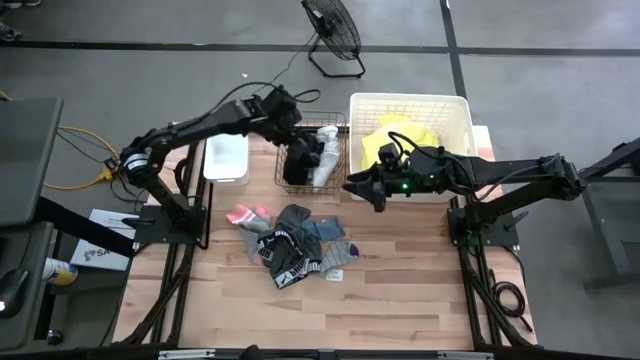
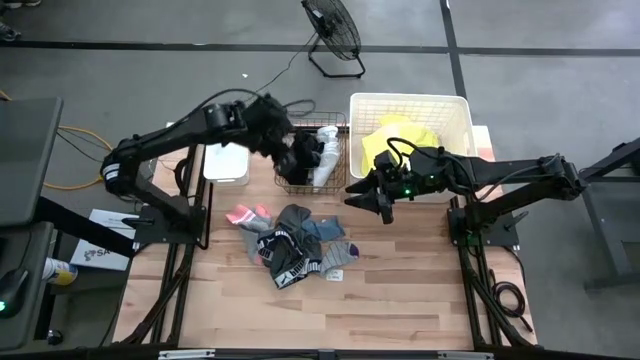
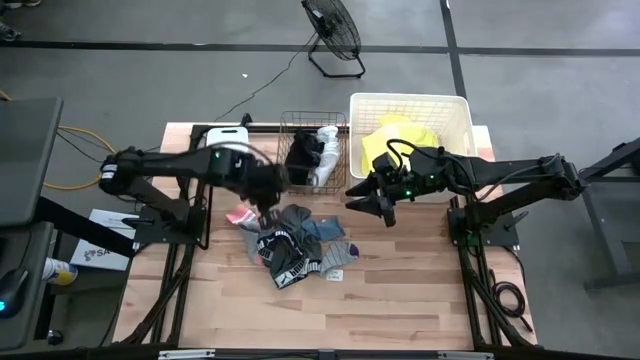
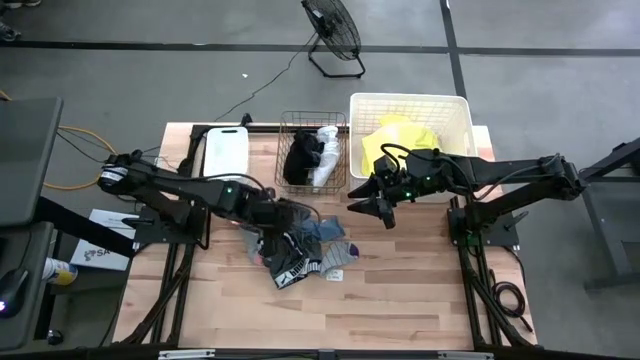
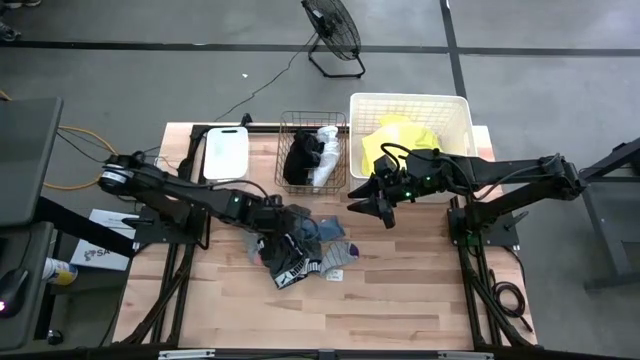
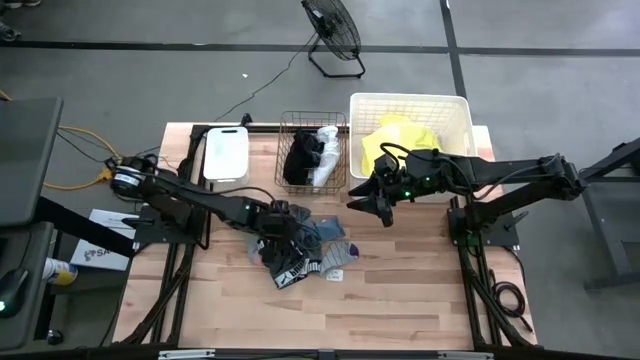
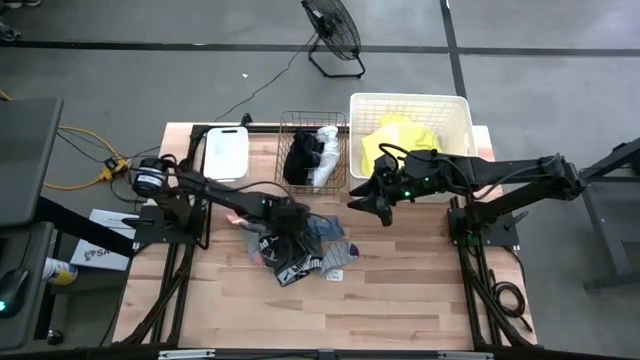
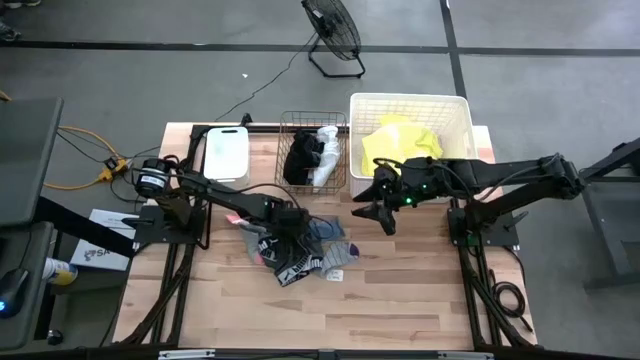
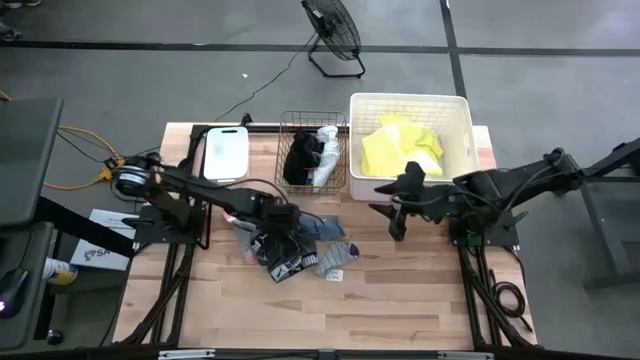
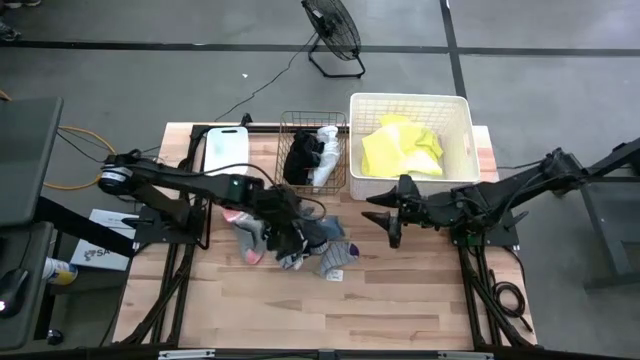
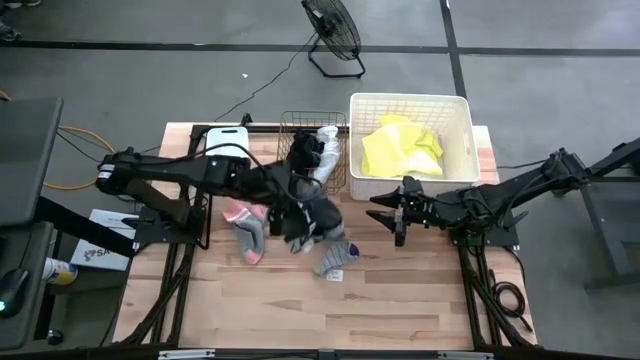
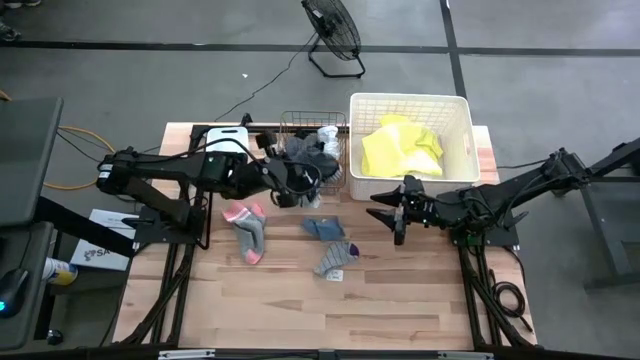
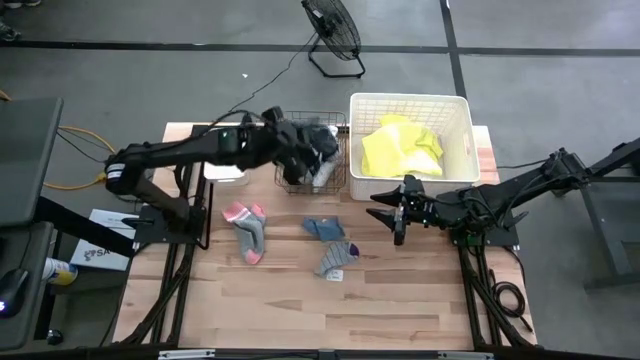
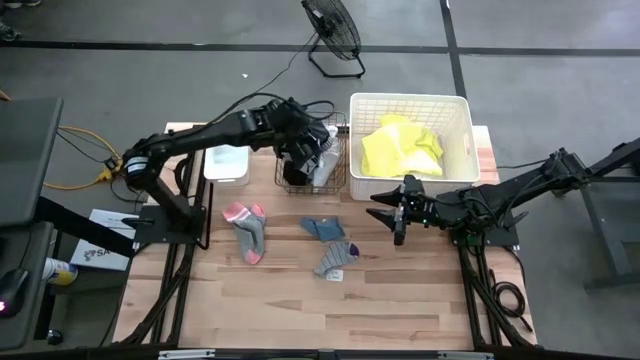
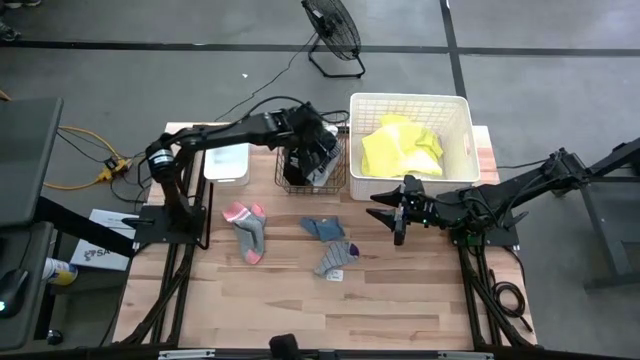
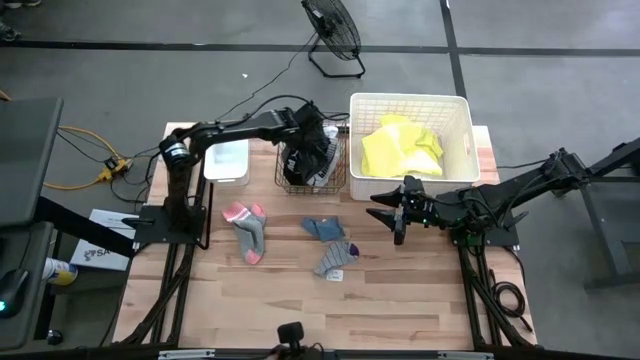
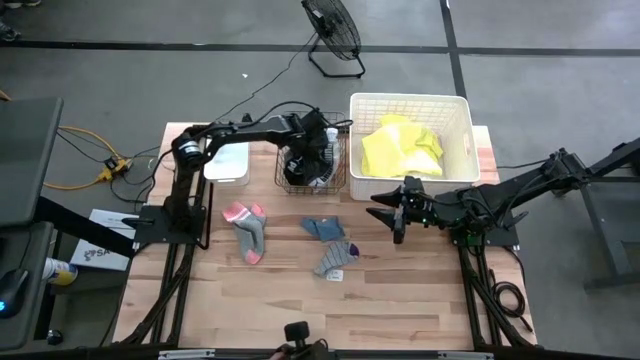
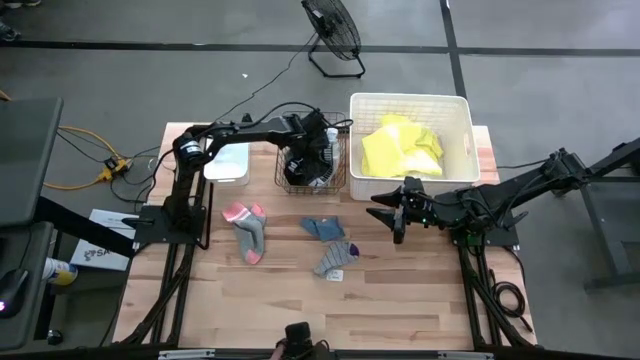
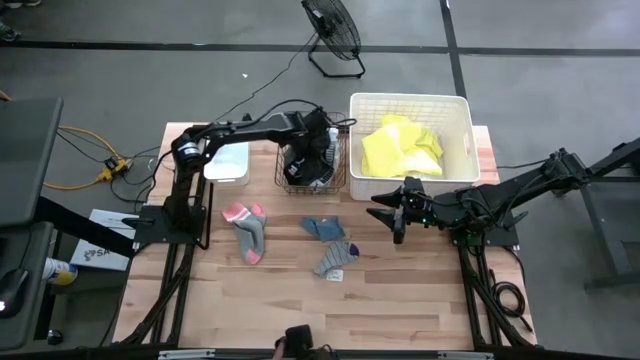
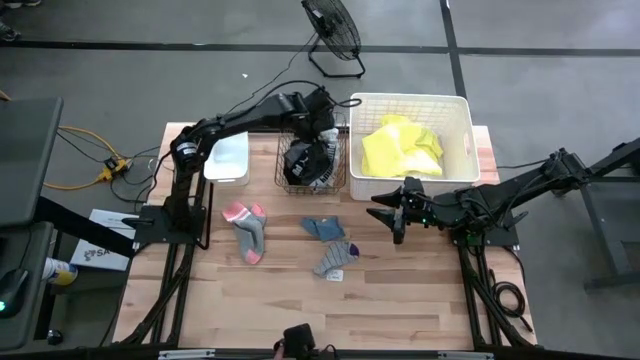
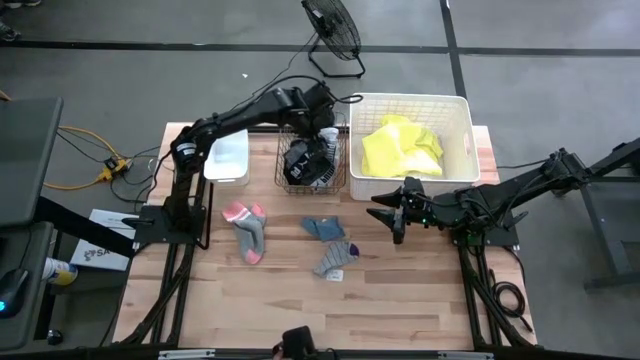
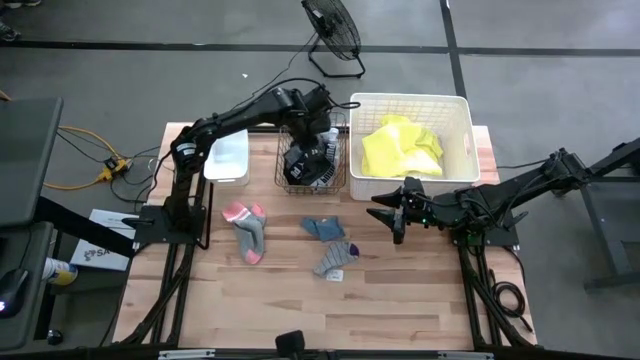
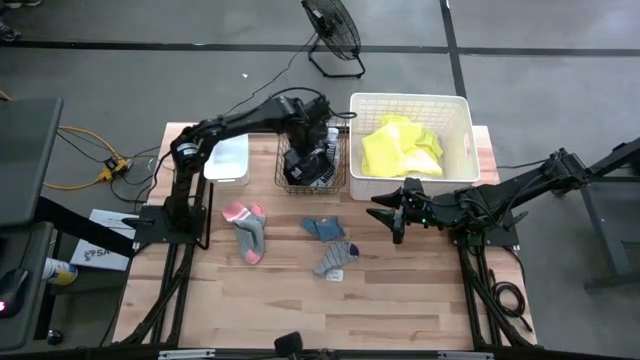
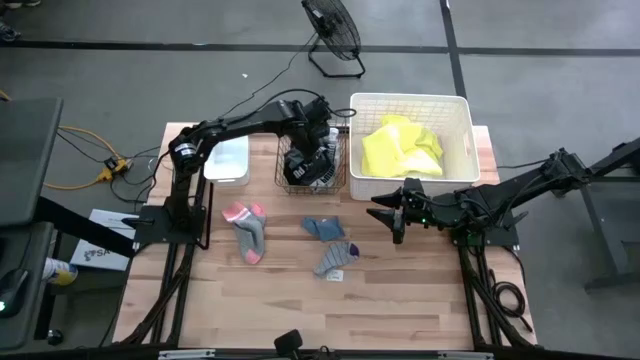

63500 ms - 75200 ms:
Task: Pick & Place Cloths
Put the gray underwear into the gold wire basket

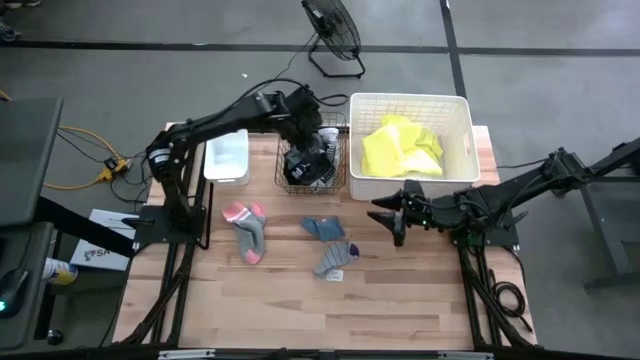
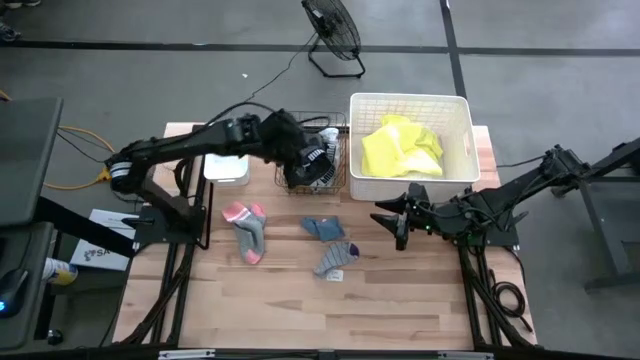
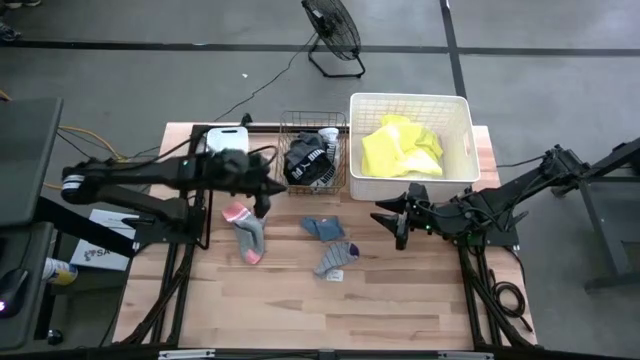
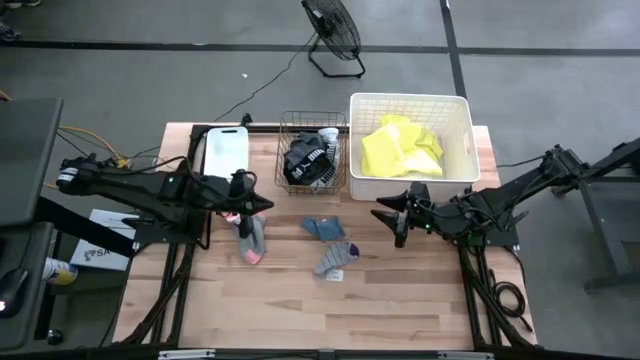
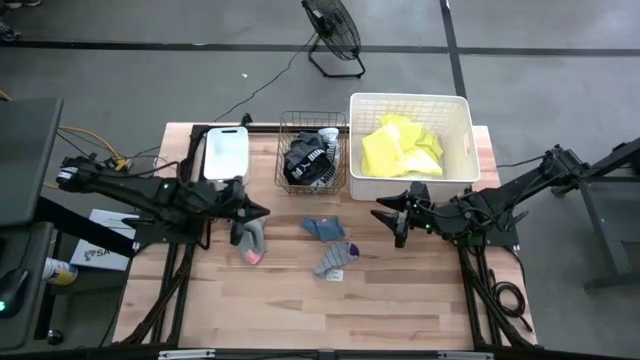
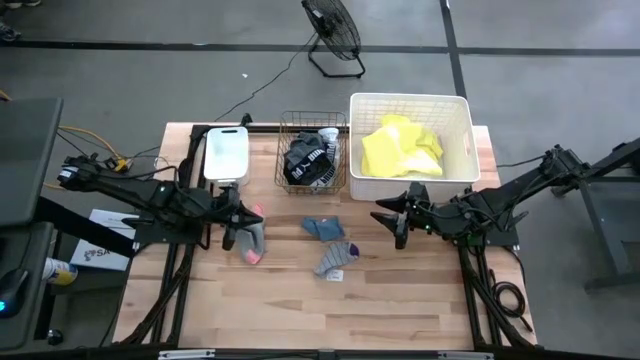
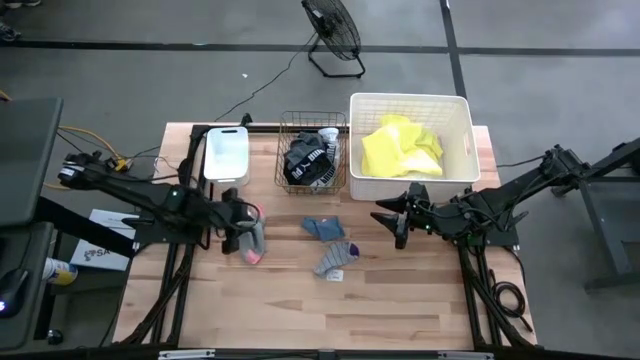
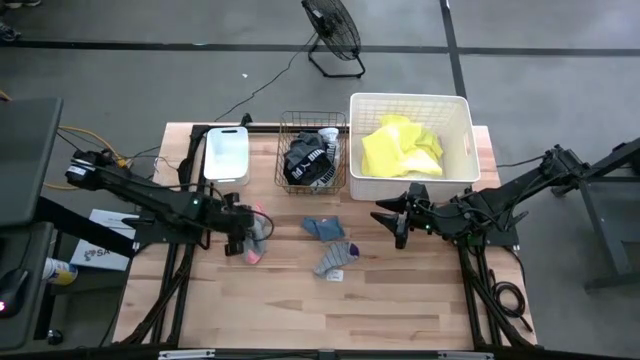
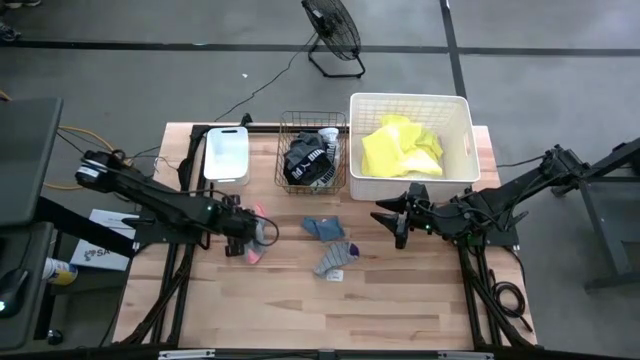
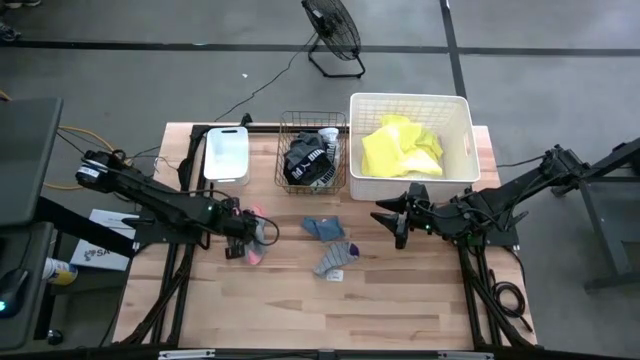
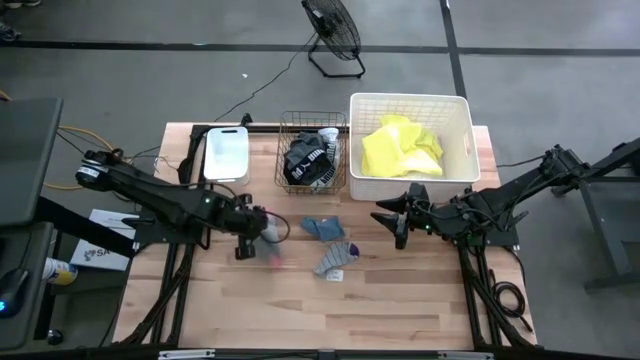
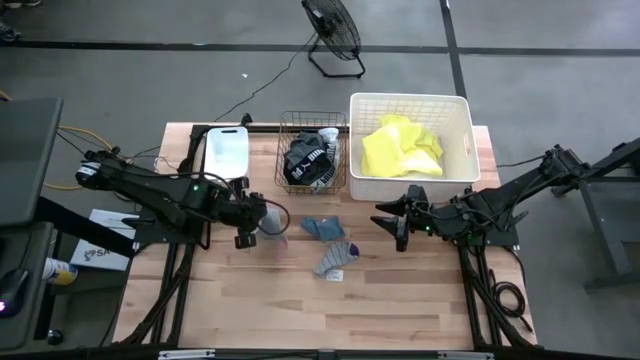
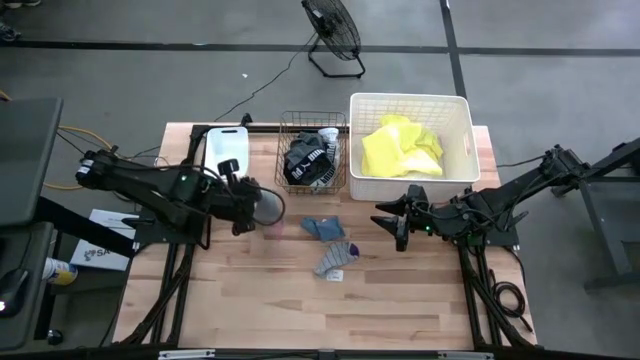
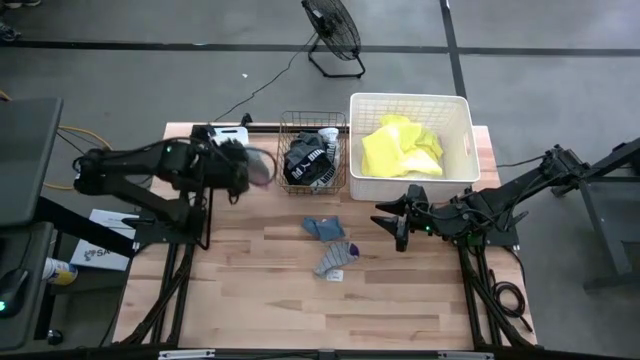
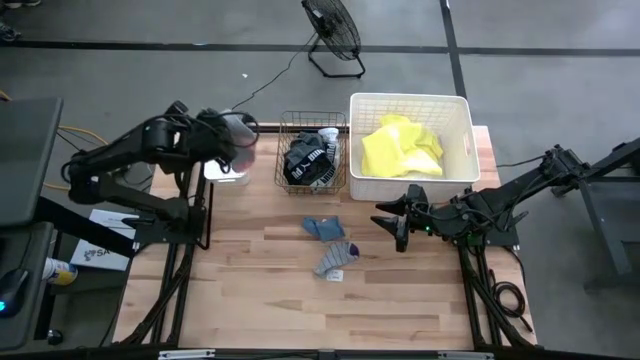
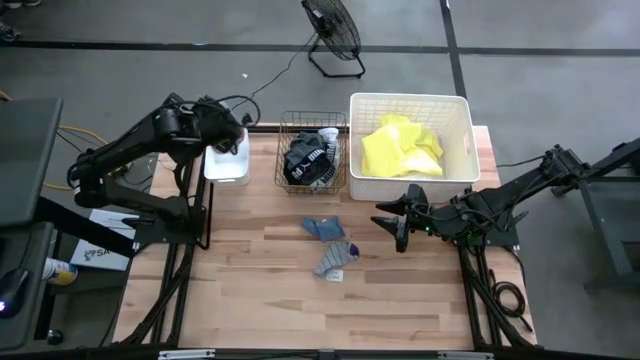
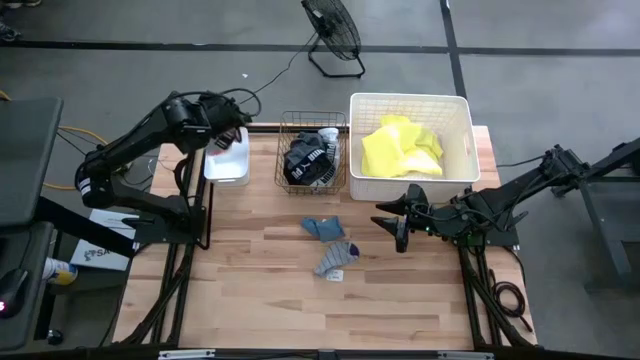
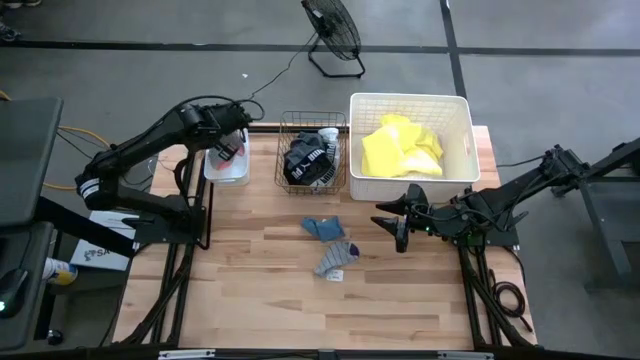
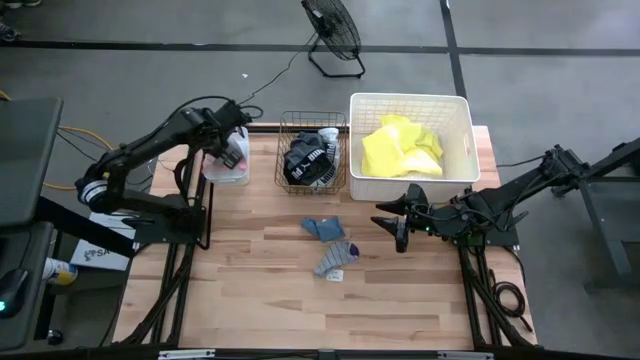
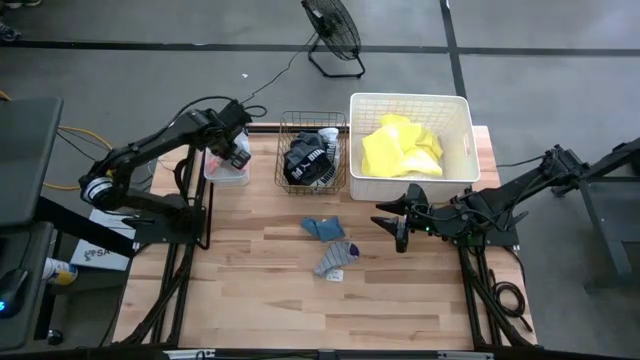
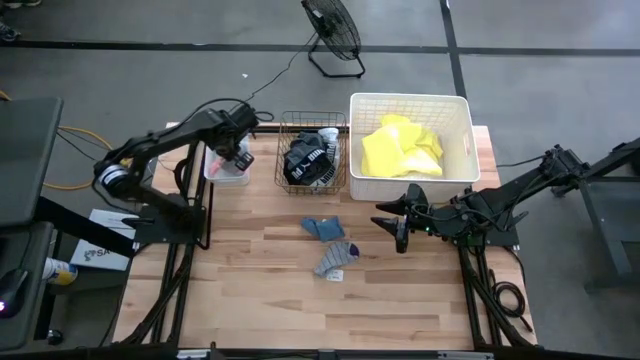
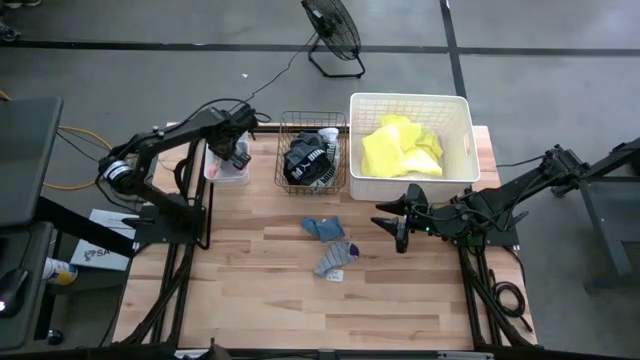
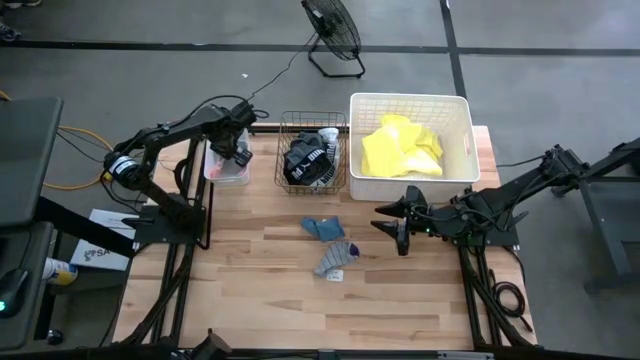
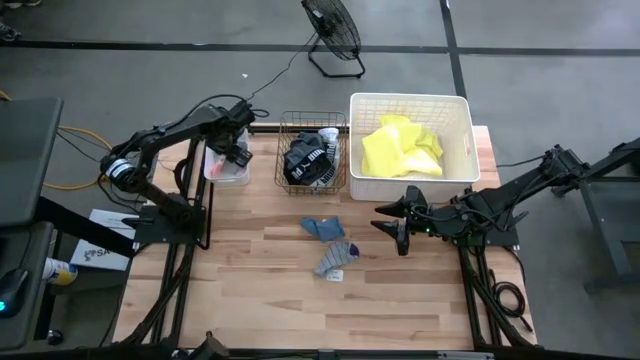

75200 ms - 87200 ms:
Put the gray and pink sock into the left white bin
